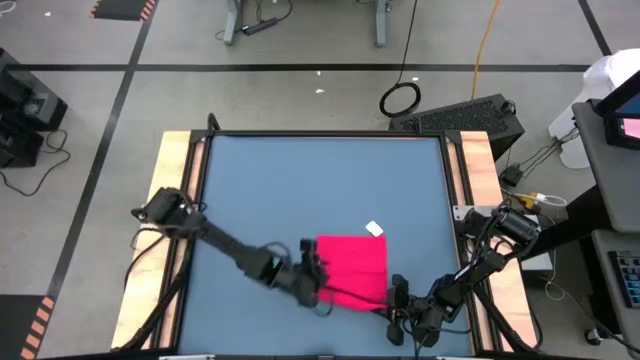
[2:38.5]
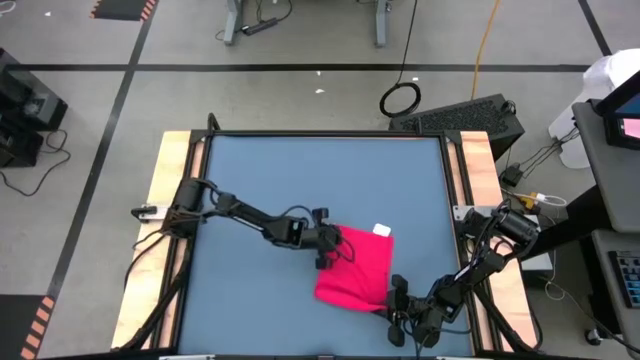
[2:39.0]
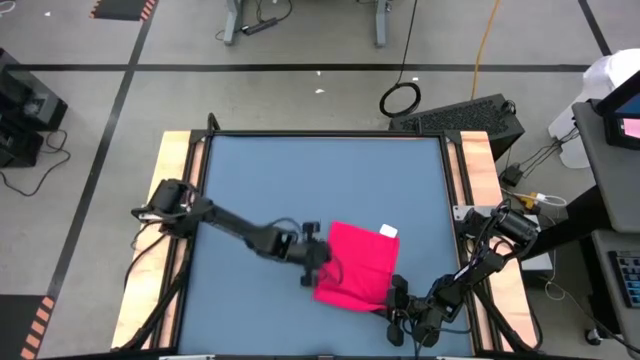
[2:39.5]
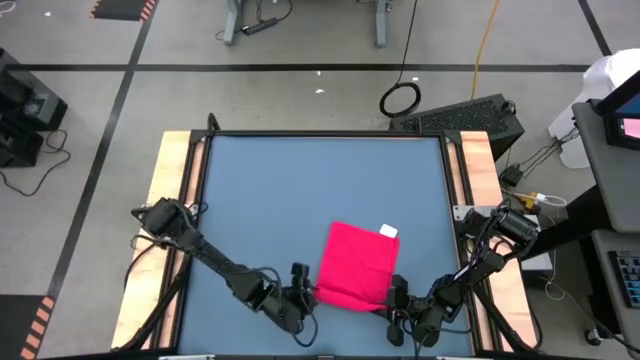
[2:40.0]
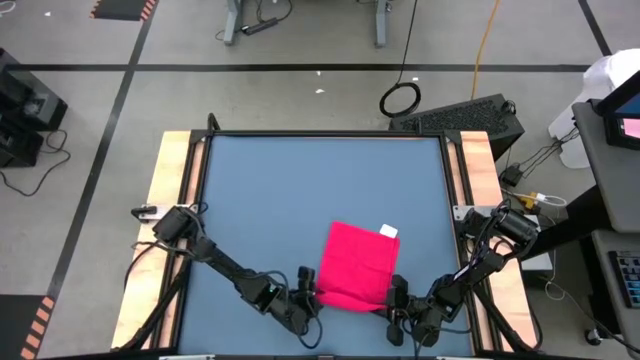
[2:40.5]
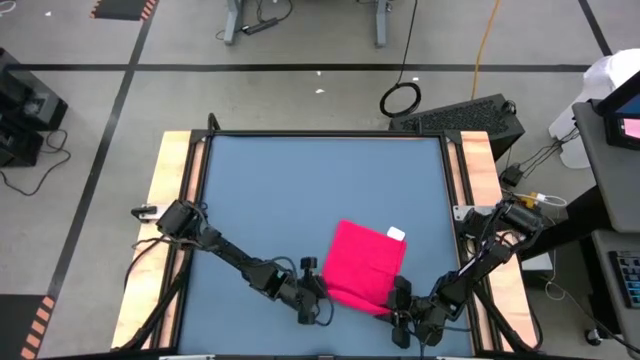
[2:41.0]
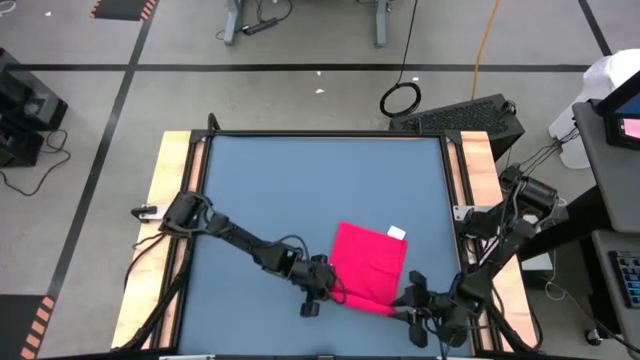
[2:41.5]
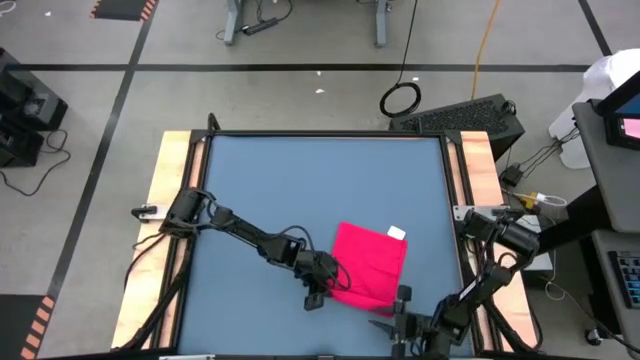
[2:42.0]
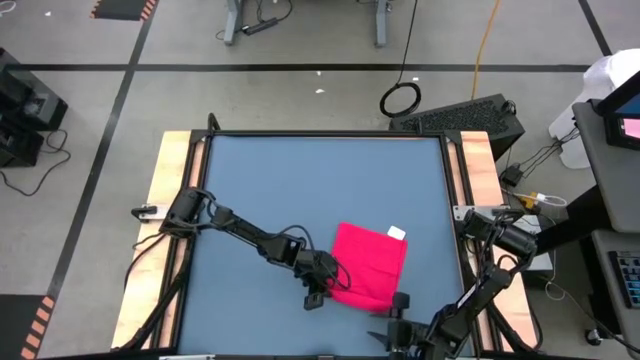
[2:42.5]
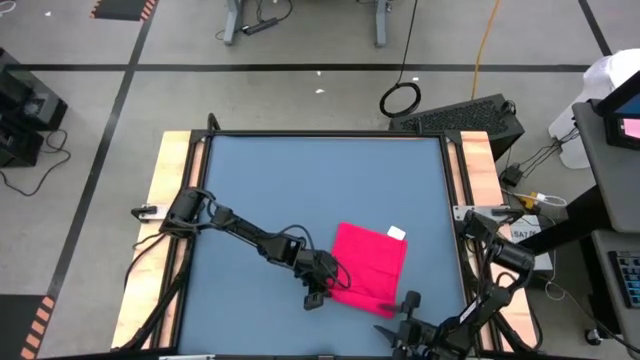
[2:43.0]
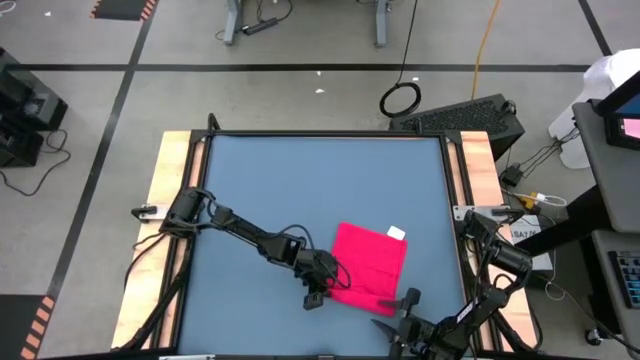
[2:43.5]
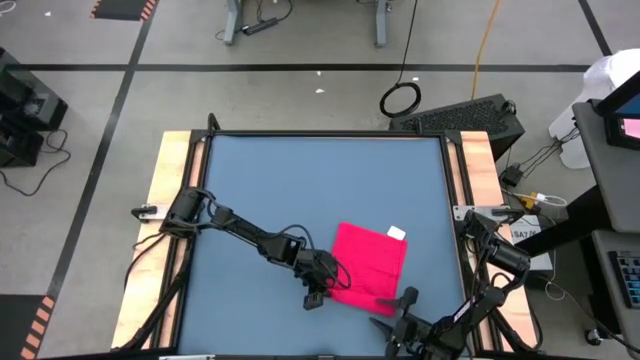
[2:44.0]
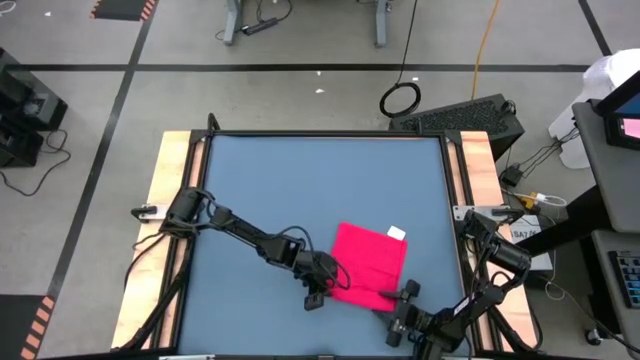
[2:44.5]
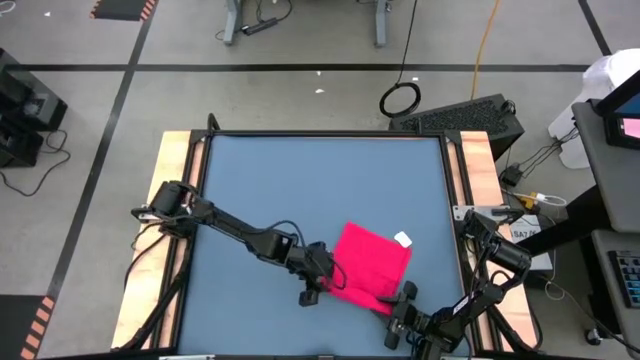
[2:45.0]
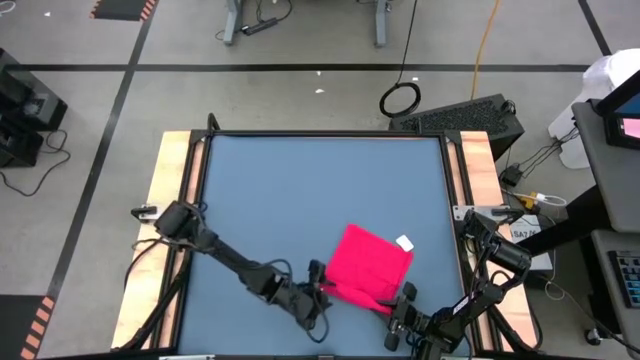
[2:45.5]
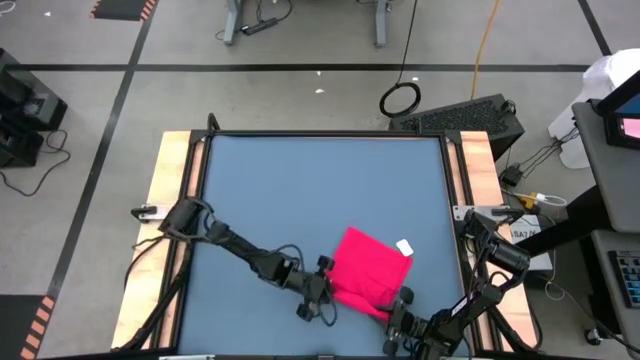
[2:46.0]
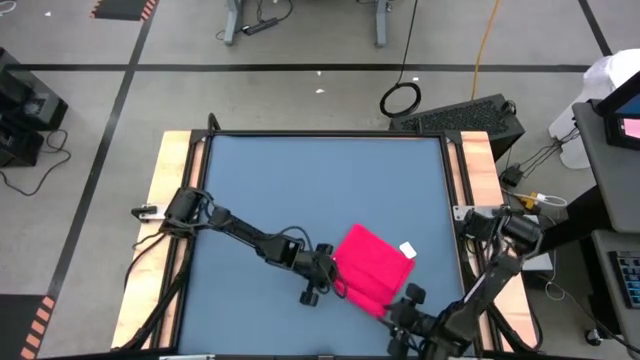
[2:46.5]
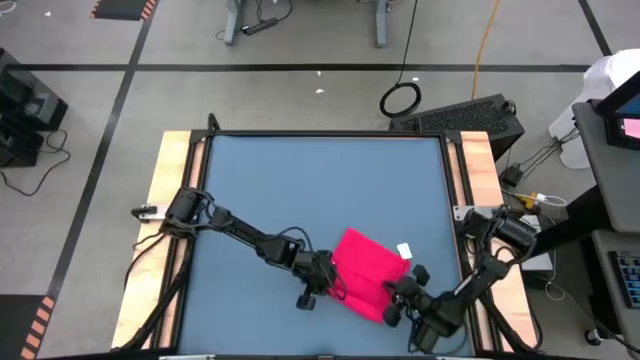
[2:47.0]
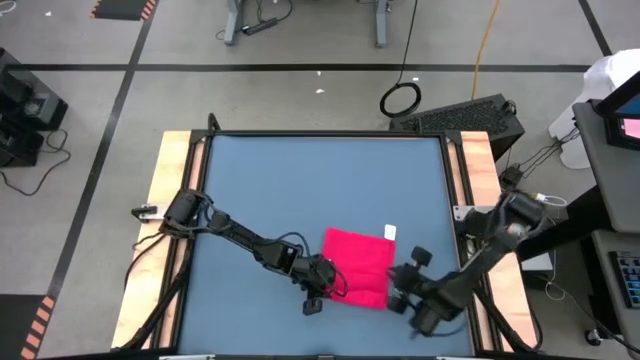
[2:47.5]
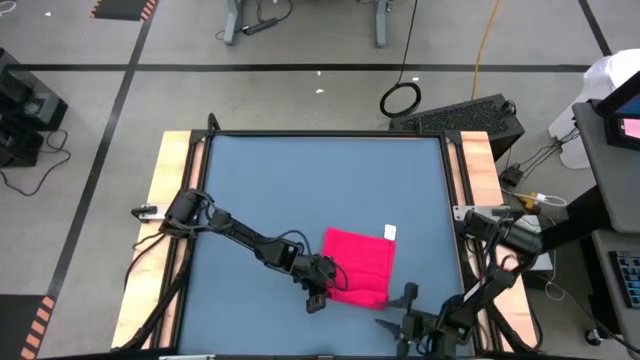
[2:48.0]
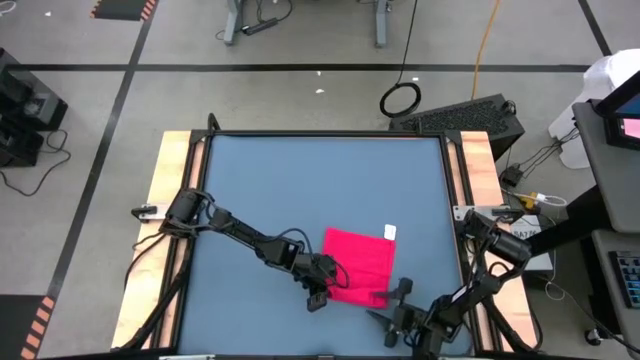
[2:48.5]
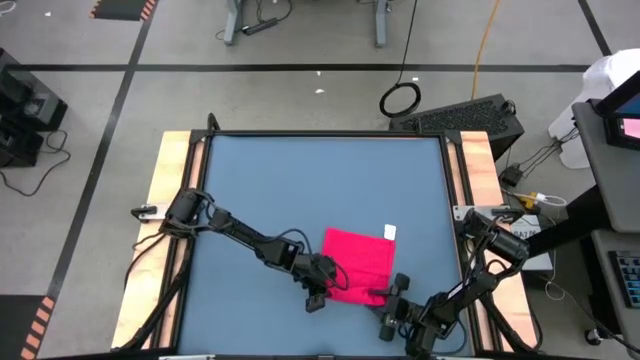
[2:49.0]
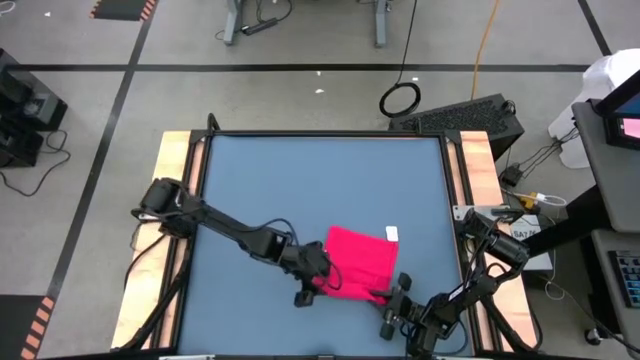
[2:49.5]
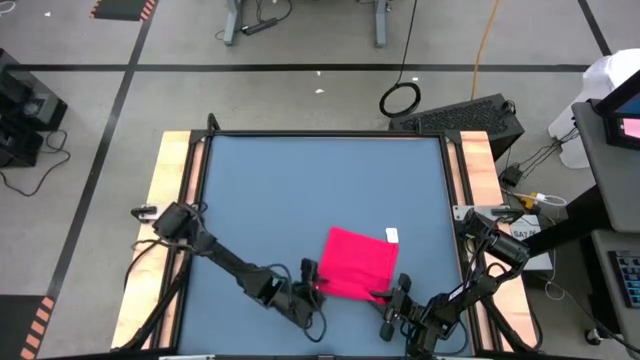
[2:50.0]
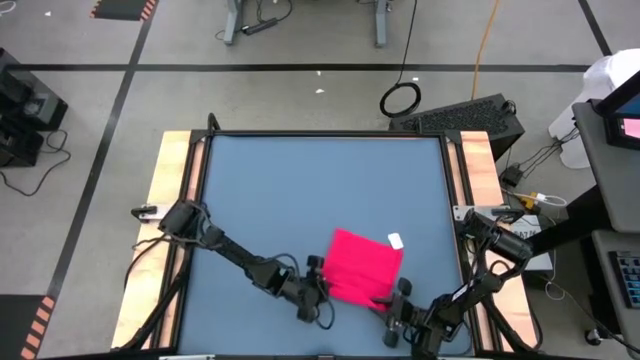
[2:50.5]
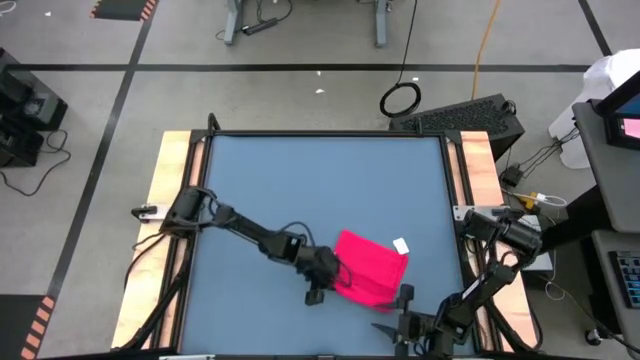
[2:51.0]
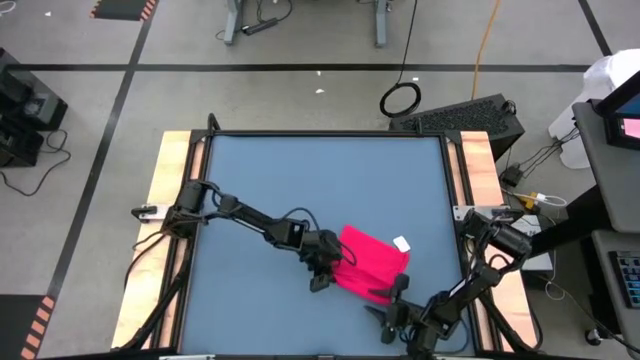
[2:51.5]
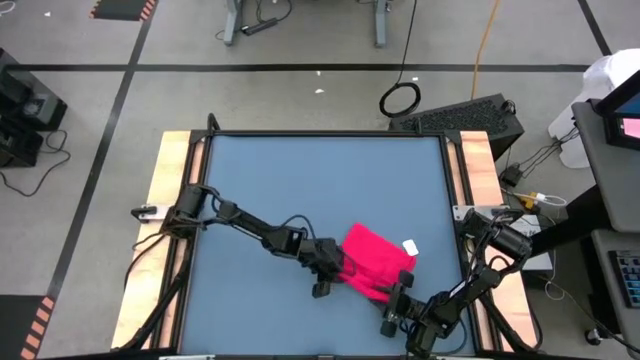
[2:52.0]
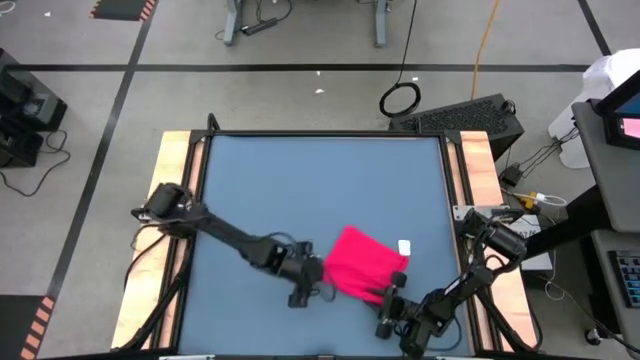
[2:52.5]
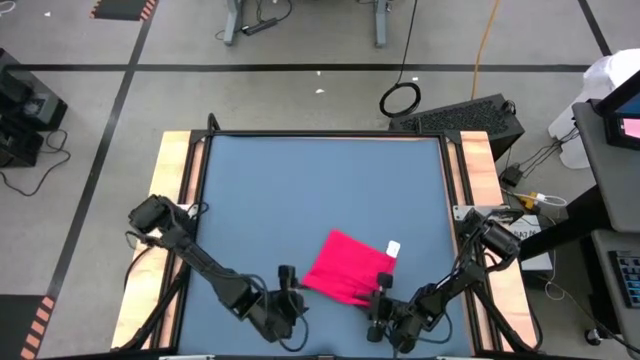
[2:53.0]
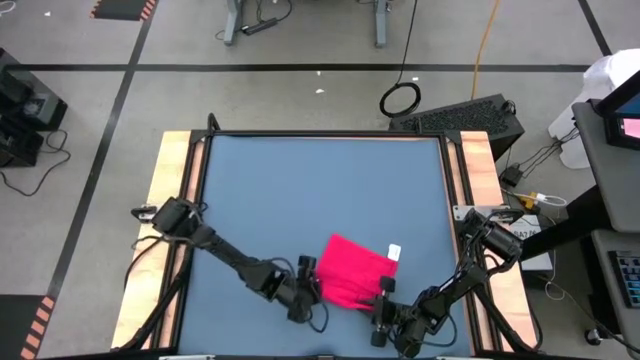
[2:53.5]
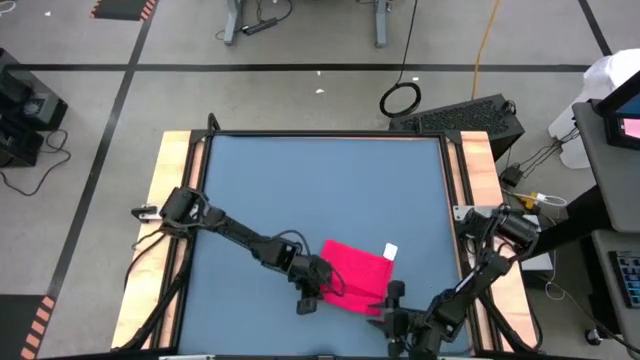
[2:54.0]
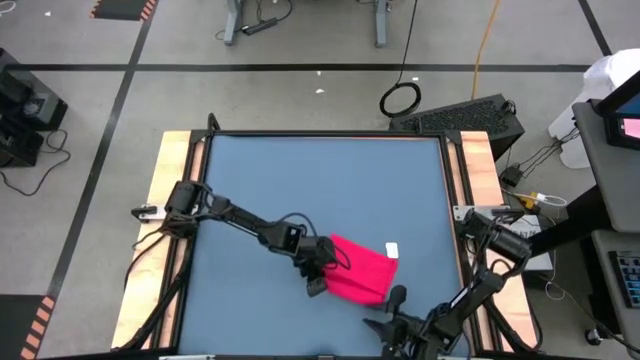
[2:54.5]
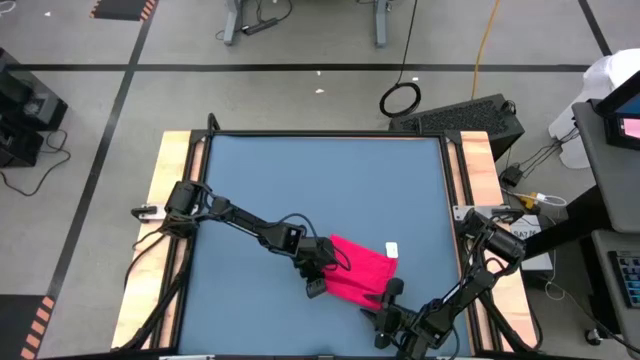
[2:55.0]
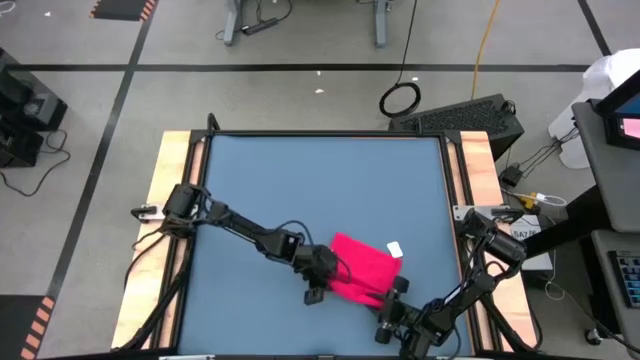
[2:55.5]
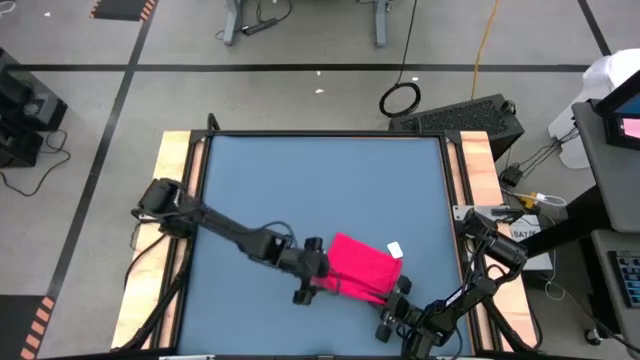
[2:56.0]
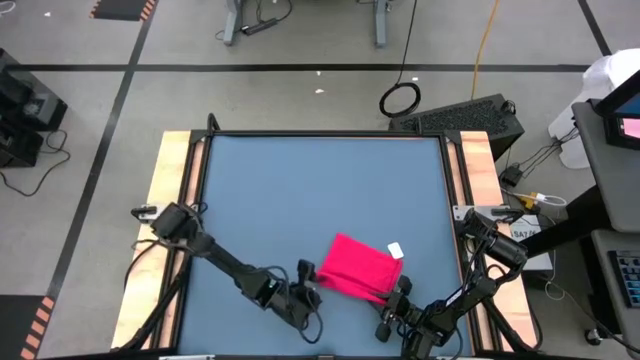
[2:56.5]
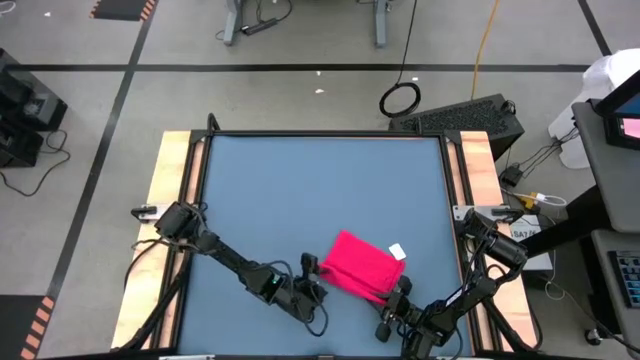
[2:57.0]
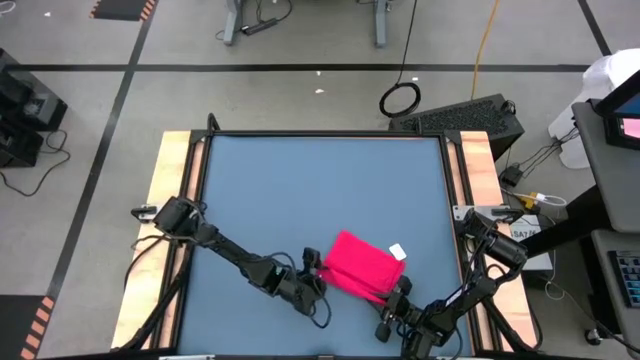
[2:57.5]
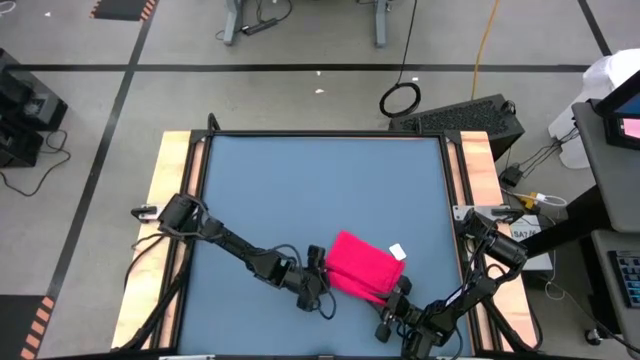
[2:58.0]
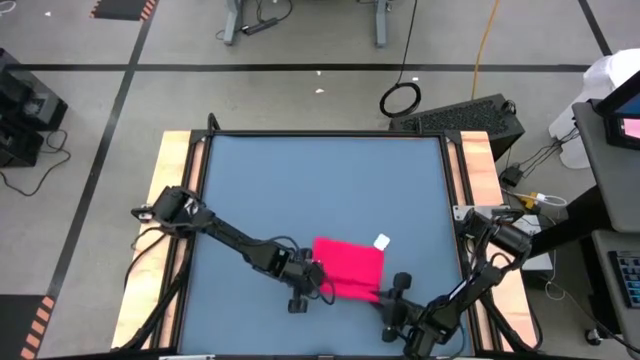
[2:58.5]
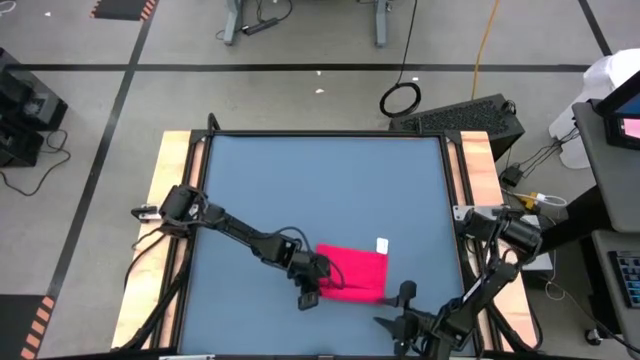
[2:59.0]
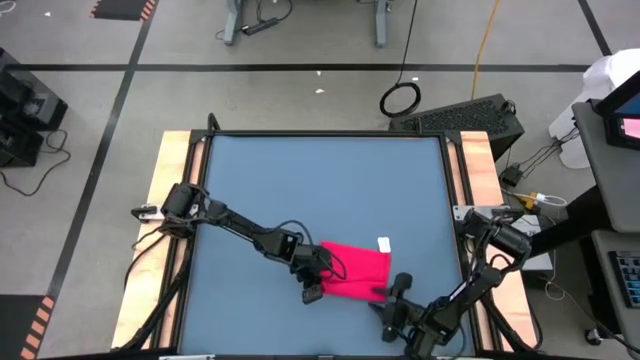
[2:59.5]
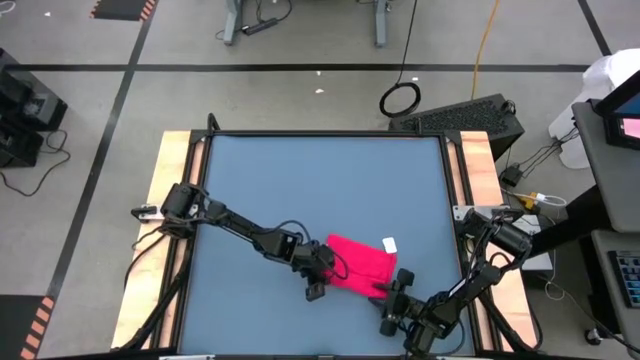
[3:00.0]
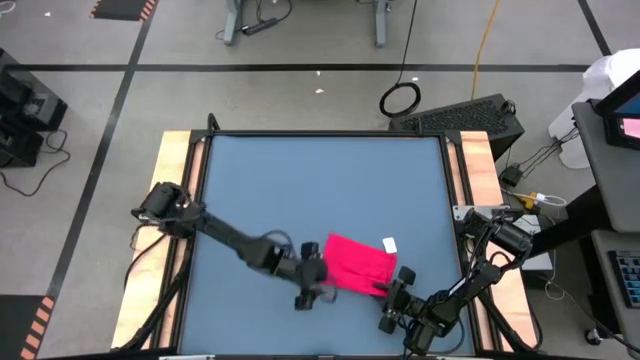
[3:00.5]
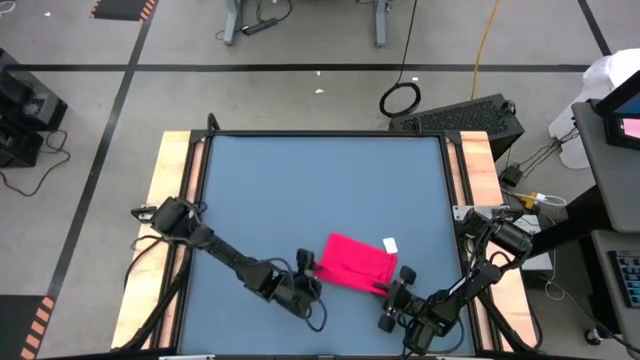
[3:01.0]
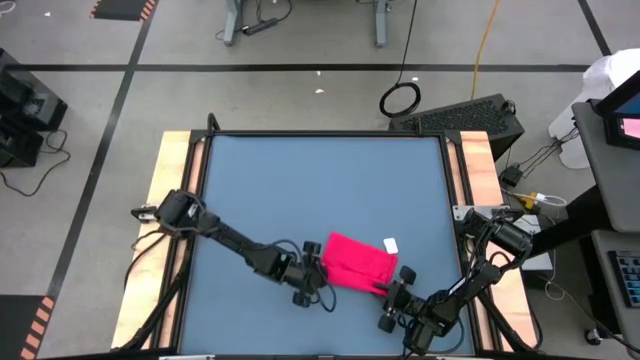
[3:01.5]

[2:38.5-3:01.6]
Task: Roll towel
Roll the red towel
